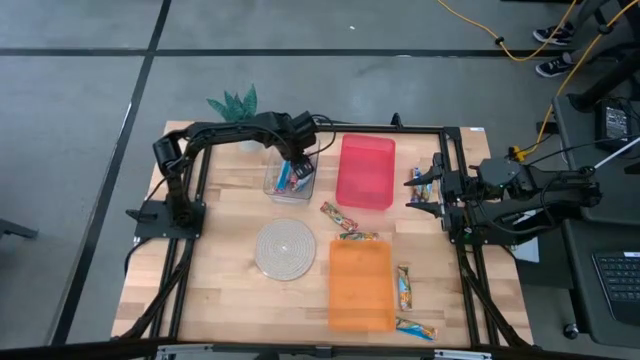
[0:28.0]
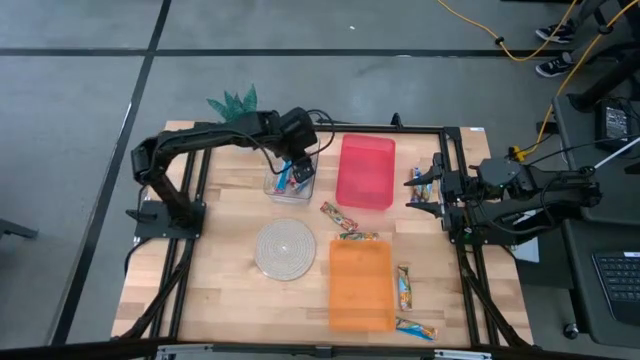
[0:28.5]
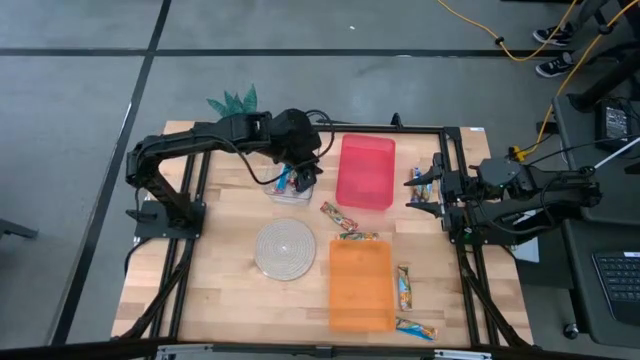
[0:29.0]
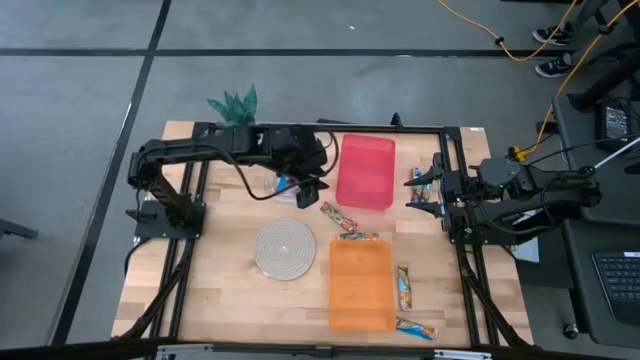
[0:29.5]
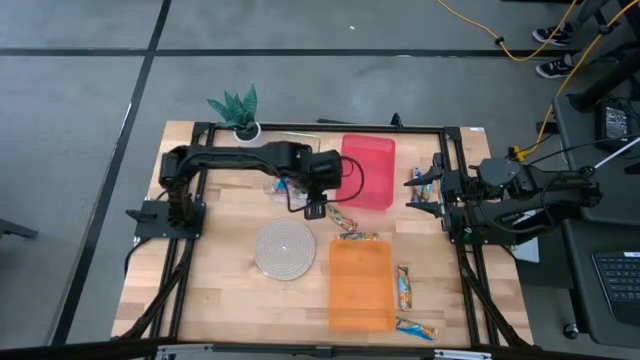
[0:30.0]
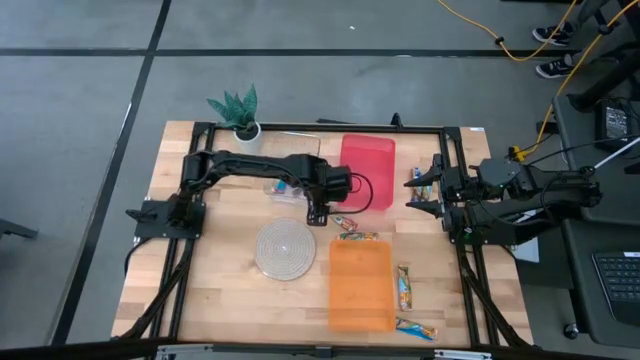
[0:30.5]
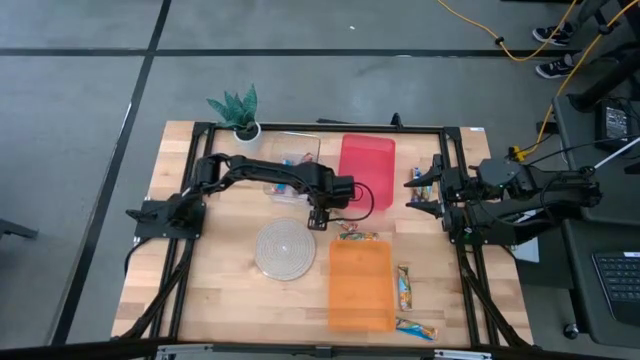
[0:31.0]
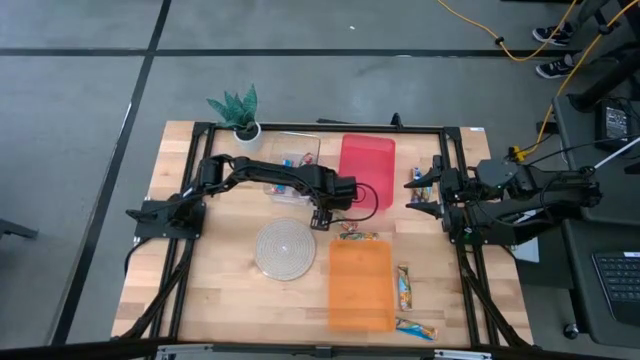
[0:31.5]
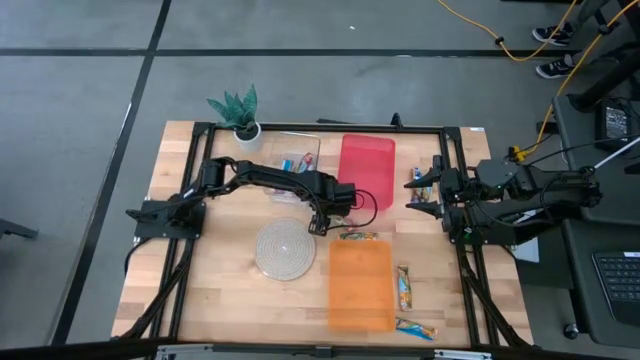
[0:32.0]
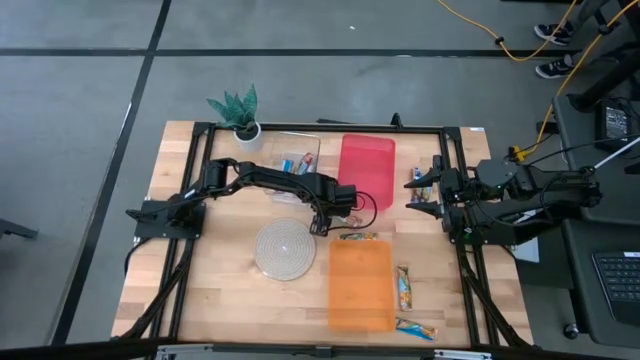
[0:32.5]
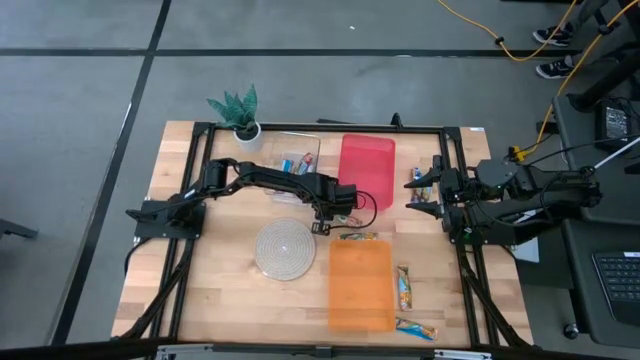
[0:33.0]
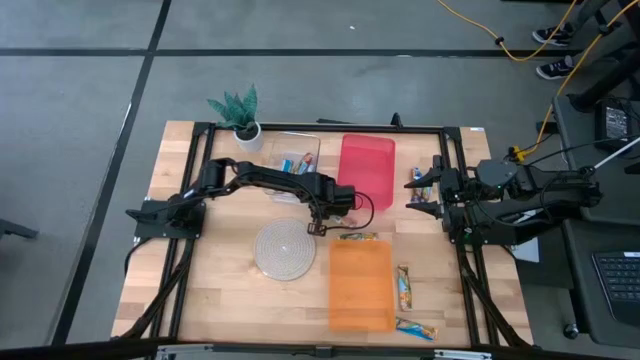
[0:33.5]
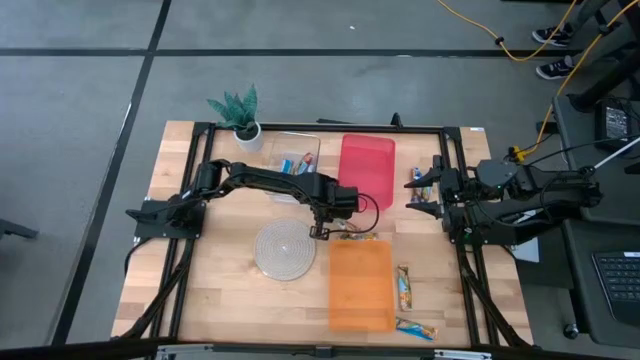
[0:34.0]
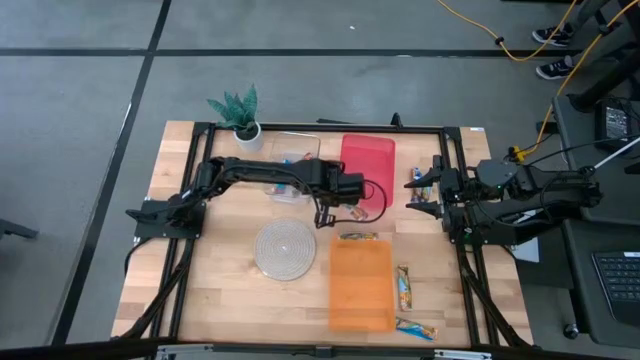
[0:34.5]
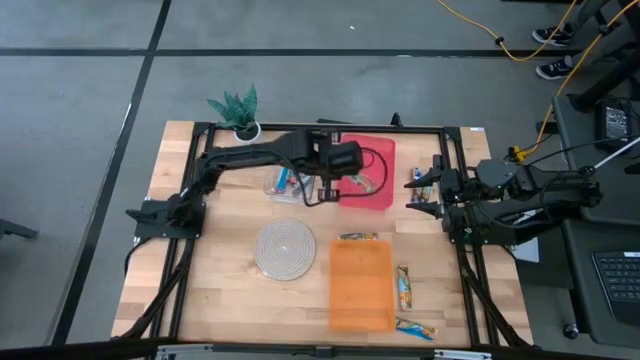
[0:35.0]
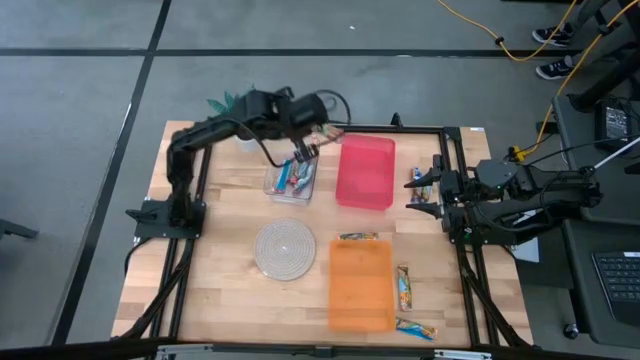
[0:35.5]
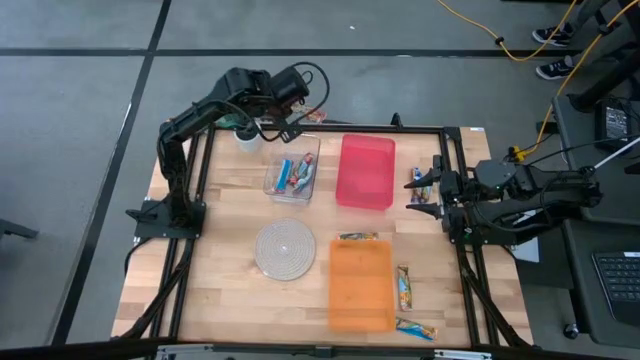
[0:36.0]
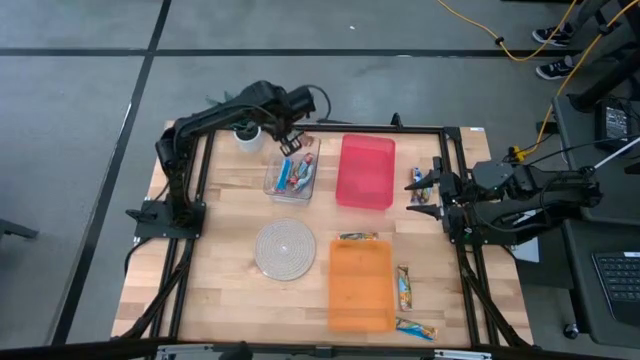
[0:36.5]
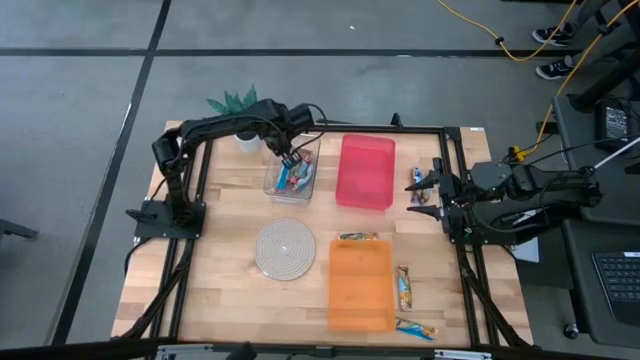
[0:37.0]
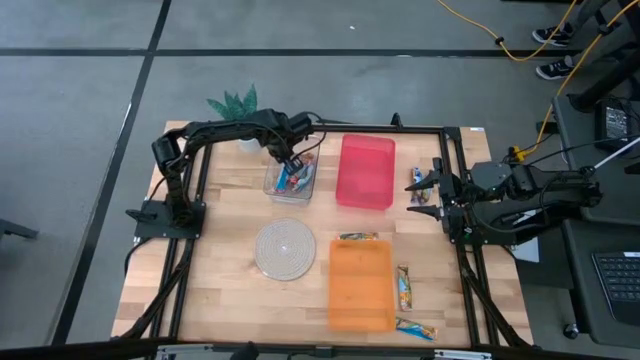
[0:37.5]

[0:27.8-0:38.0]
Task: Pick and place Granola Bars by type
Put the red granola bar into the transparent bin

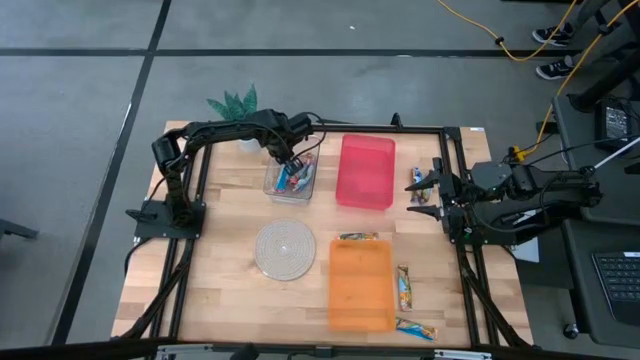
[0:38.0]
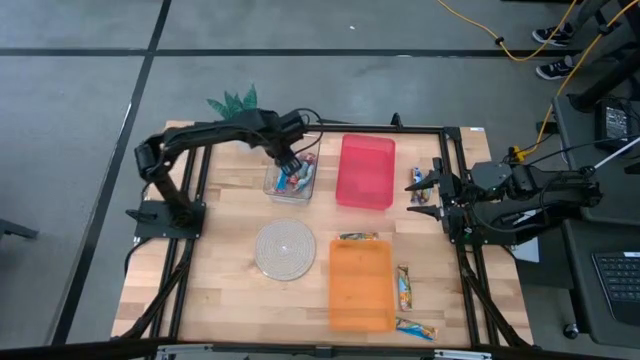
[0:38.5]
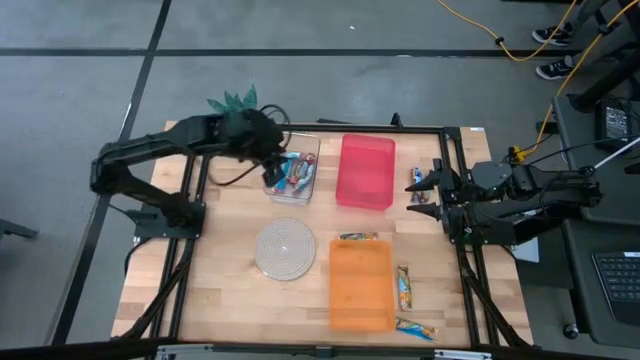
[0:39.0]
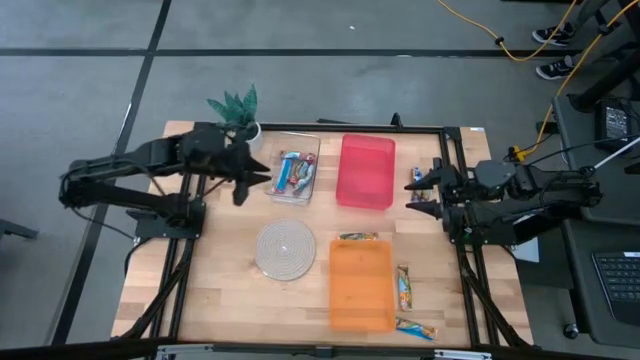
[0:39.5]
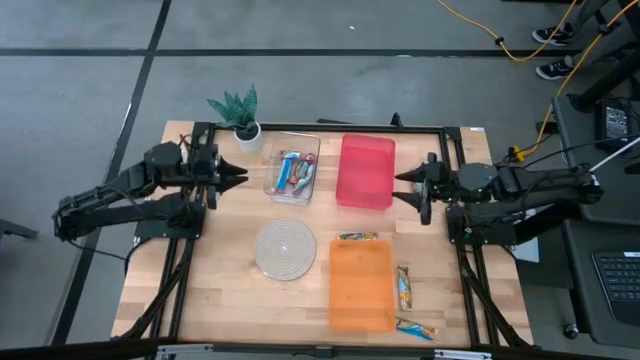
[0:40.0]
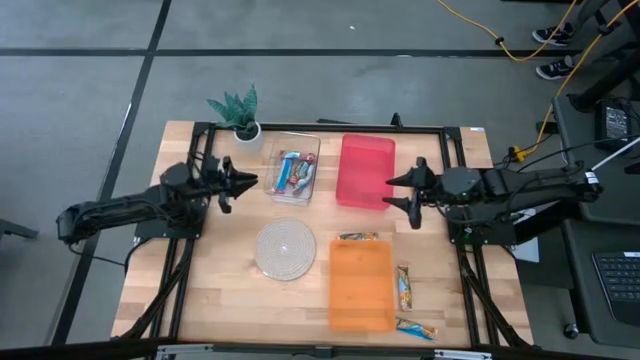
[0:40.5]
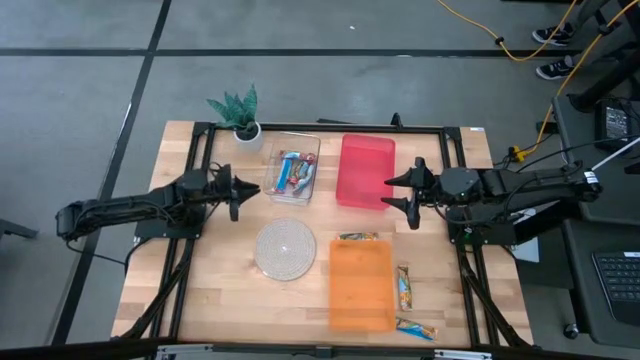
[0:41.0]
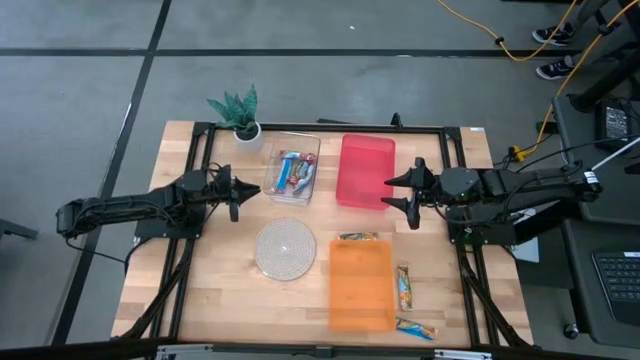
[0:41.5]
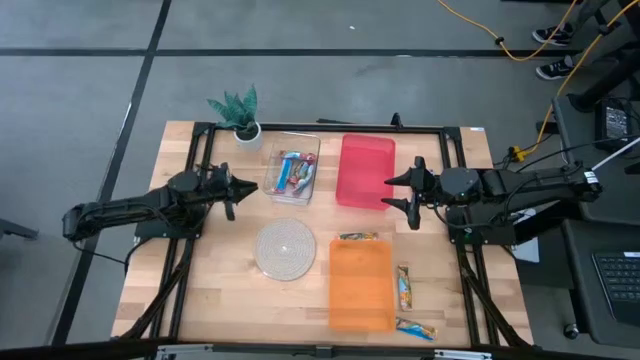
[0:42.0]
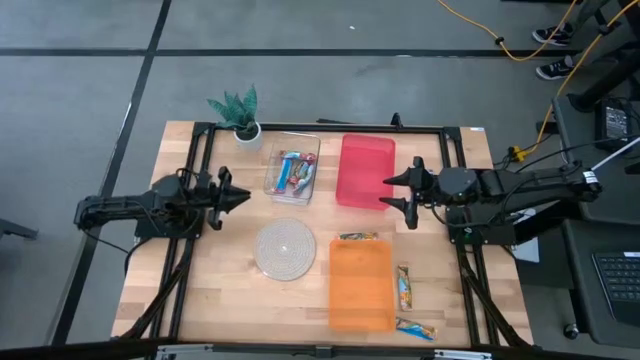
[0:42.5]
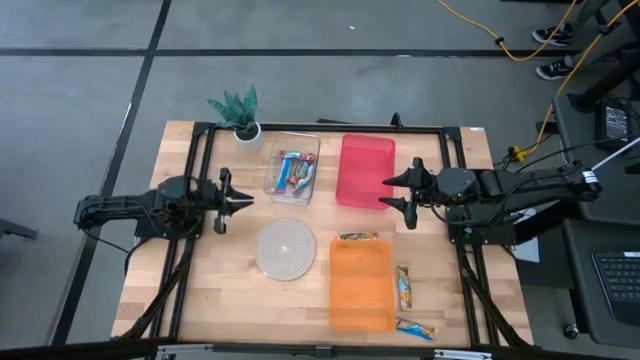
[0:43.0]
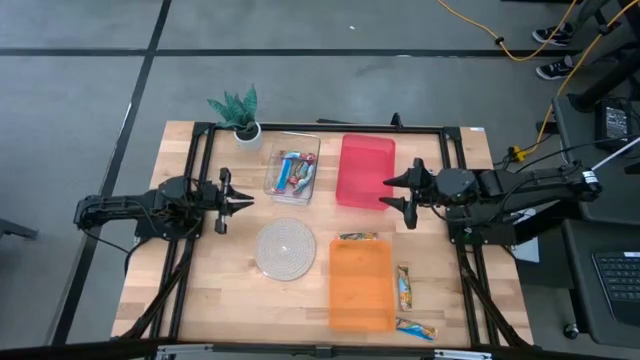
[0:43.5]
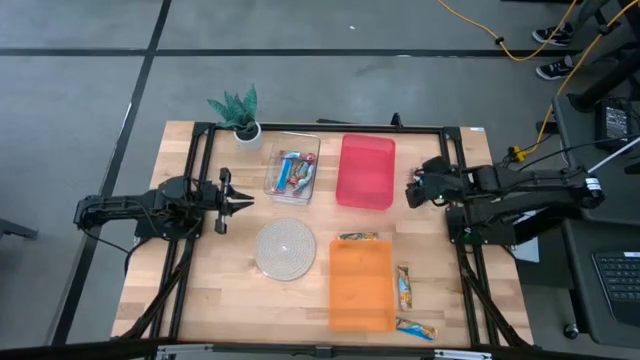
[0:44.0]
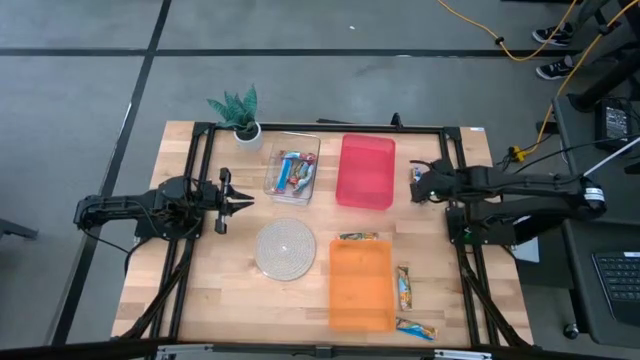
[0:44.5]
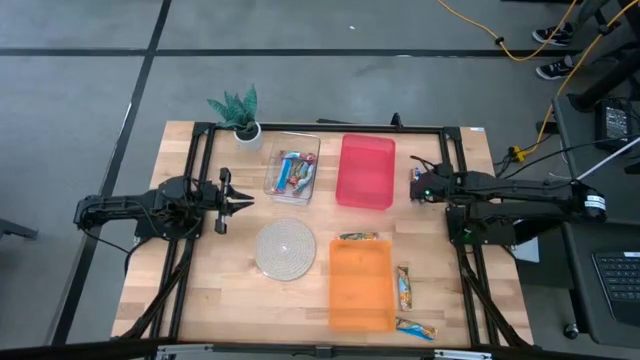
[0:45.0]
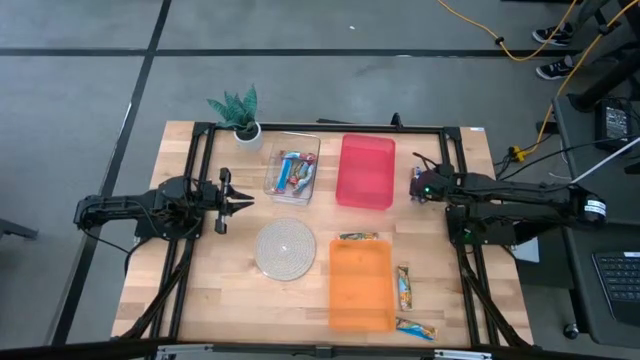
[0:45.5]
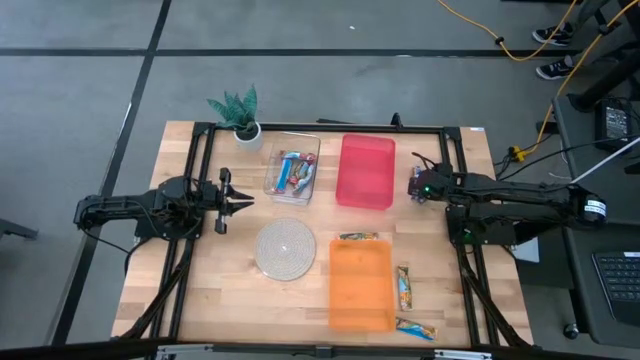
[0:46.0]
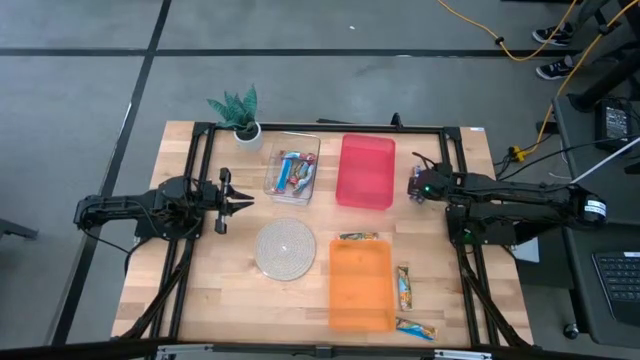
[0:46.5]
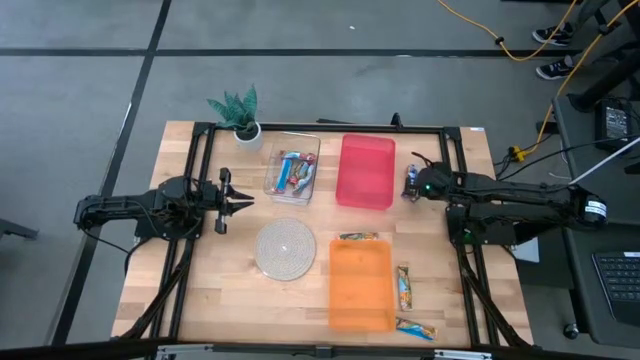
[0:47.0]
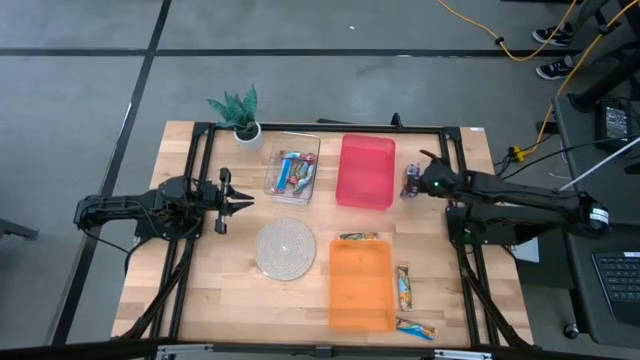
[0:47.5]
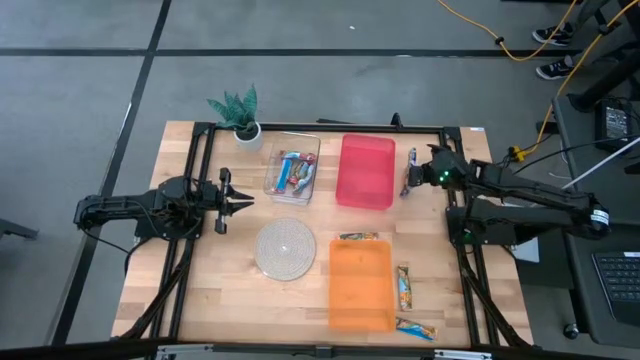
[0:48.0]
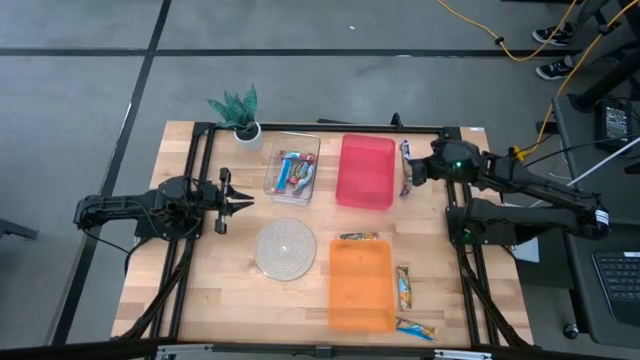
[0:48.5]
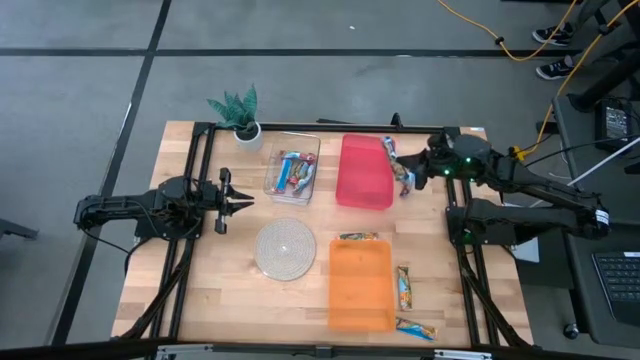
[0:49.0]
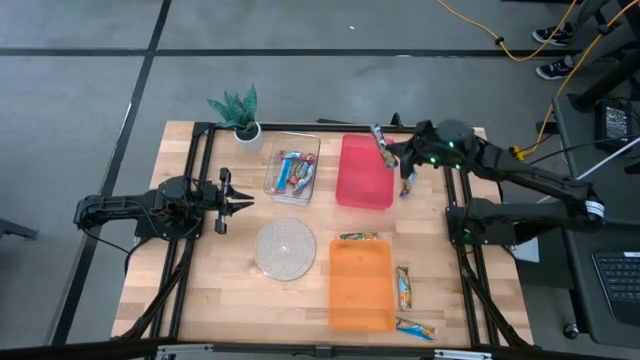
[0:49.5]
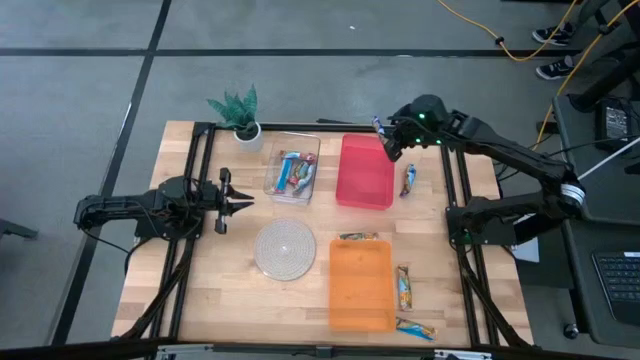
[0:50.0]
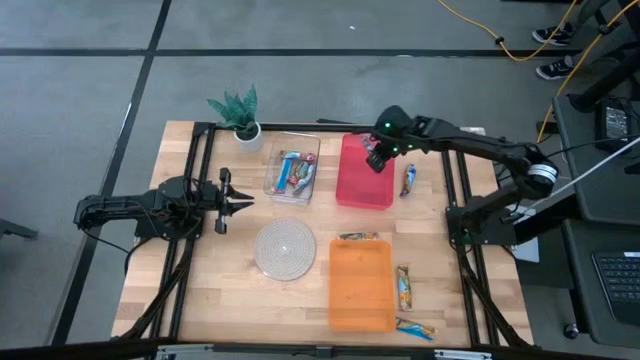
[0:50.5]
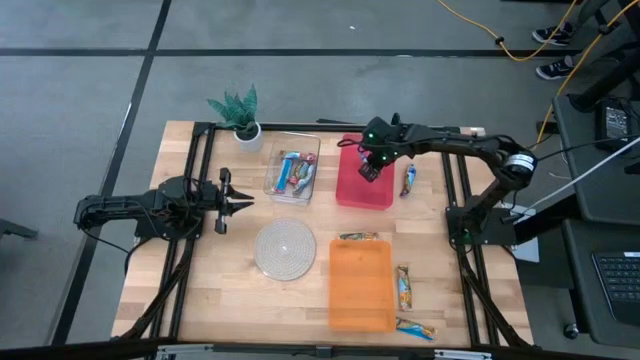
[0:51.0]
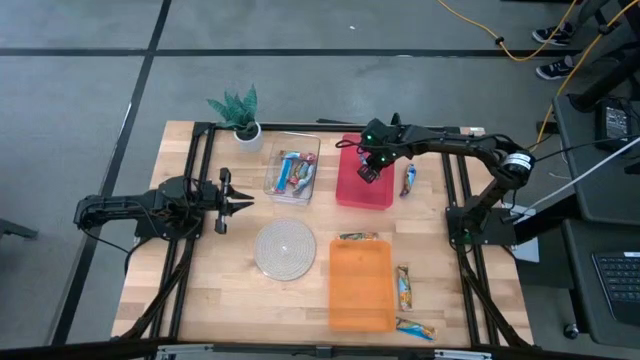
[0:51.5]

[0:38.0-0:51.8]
Put the blue granola bar into the red bin
